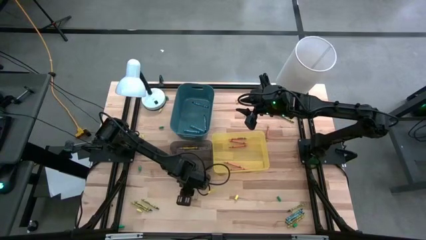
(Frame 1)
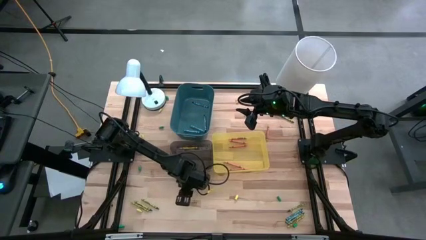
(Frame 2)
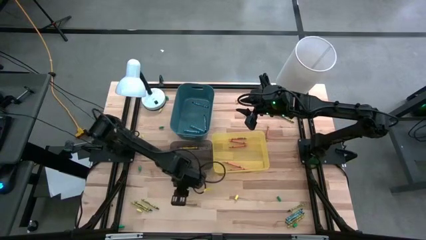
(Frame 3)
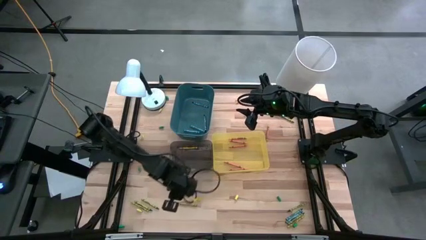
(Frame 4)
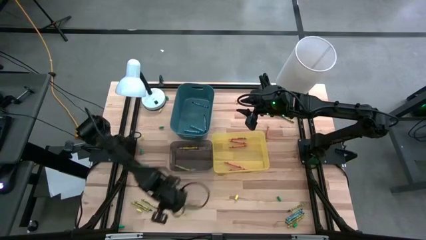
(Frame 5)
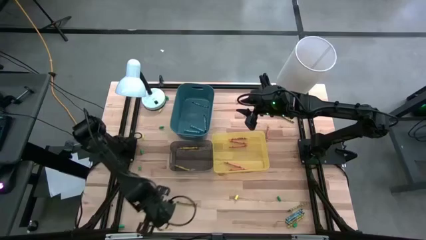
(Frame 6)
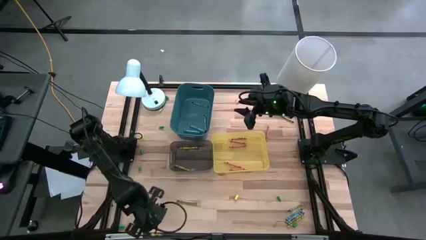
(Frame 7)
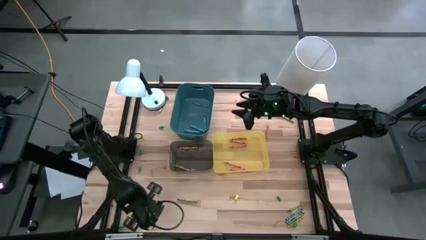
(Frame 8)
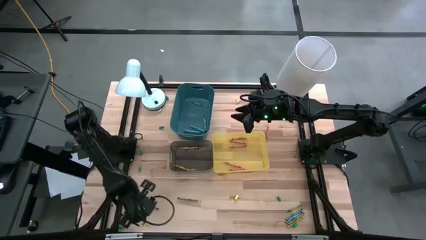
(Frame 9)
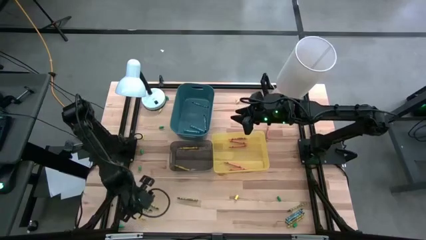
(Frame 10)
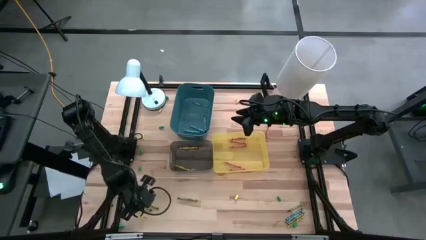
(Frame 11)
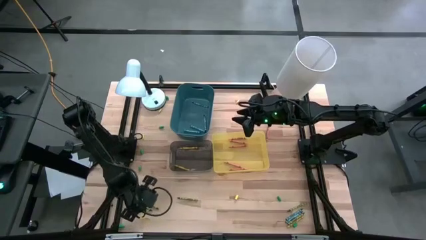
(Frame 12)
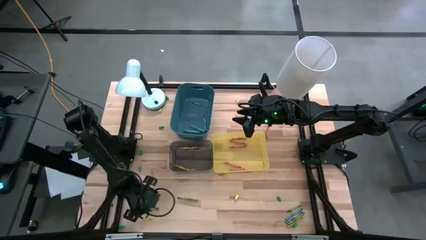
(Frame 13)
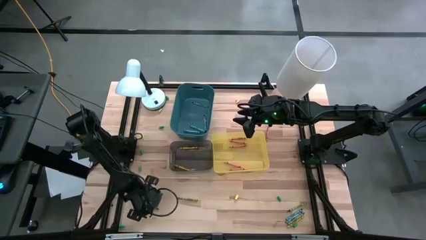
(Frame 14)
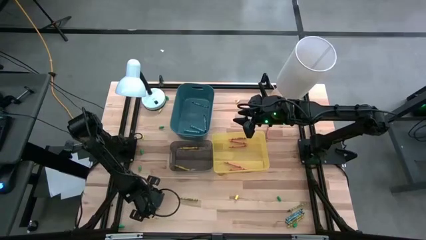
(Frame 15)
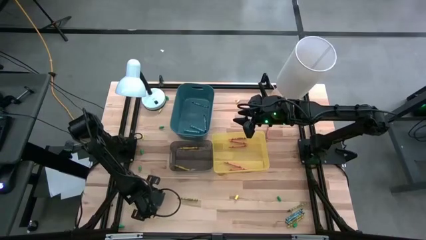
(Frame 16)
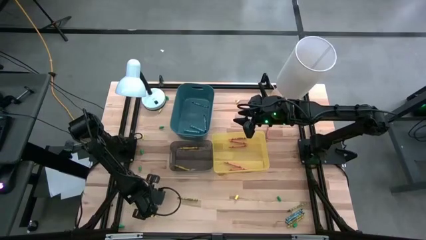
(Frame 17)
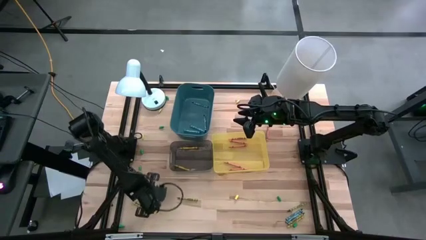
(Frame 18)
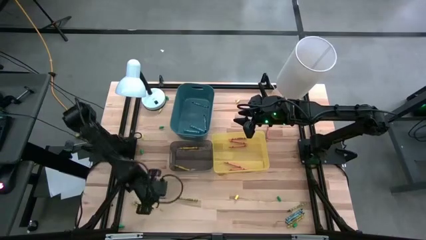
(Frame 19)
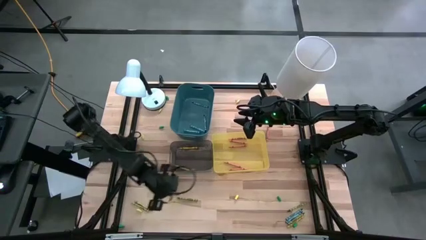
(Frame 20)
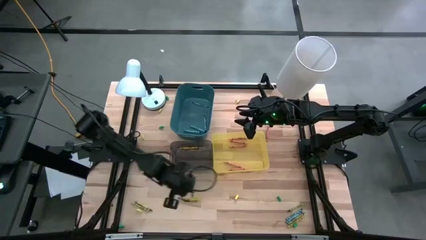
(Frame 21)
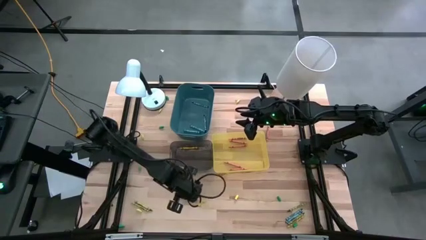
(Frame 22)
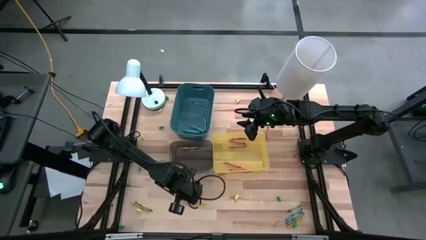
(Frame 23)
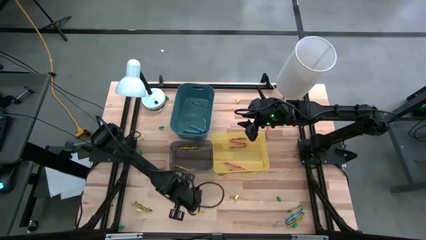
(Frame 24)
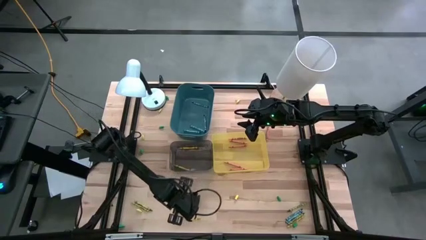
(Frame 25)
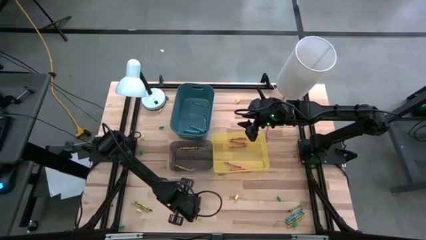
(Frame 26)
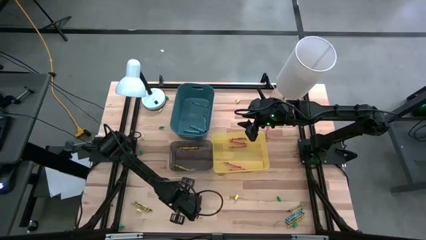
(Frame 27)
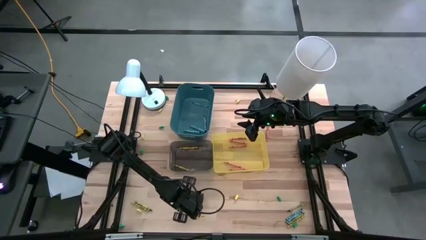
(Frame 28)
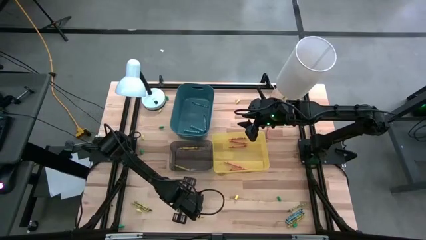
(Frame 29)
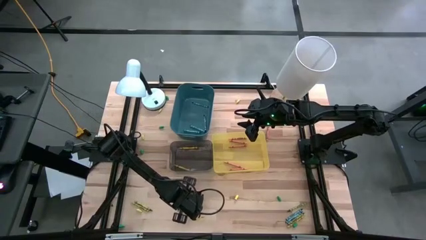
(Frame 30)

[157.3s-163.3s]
Task: Sort crayons
Move the green crayon to the bottom left of the table

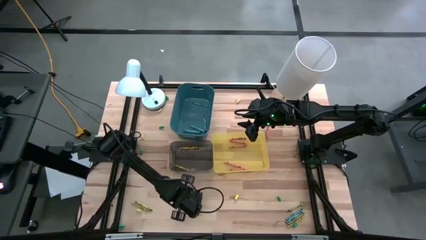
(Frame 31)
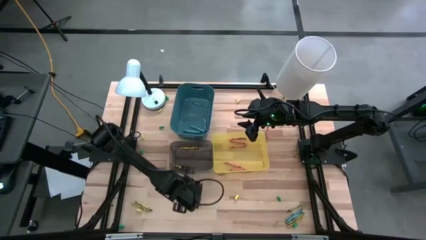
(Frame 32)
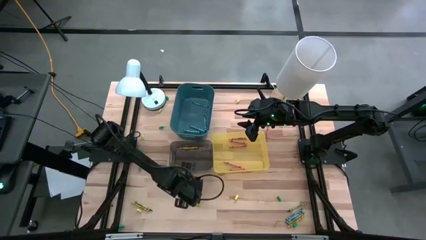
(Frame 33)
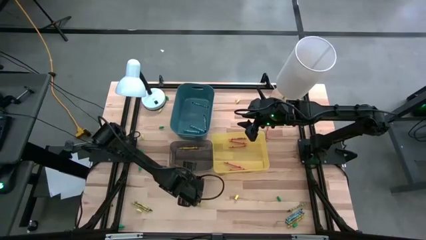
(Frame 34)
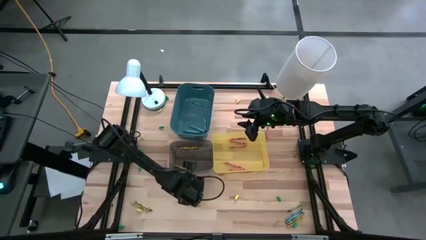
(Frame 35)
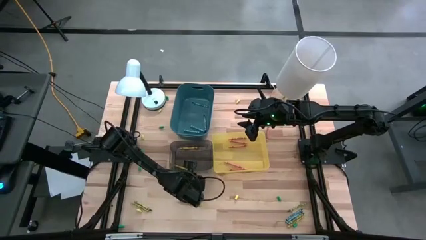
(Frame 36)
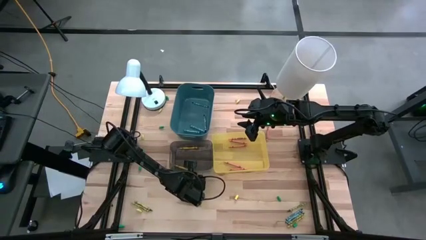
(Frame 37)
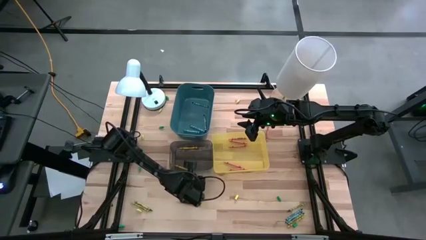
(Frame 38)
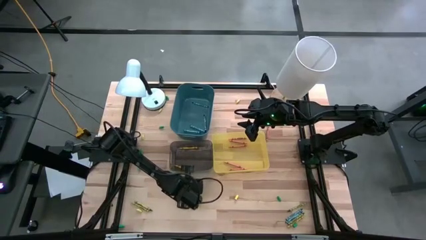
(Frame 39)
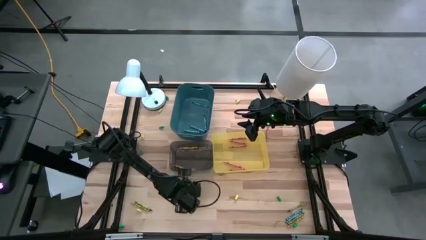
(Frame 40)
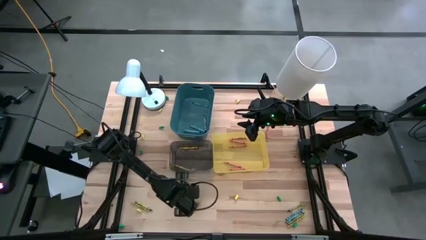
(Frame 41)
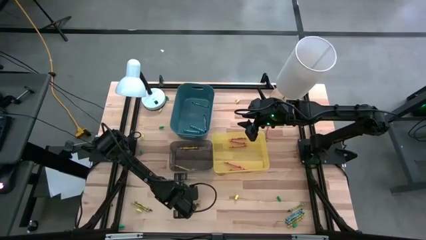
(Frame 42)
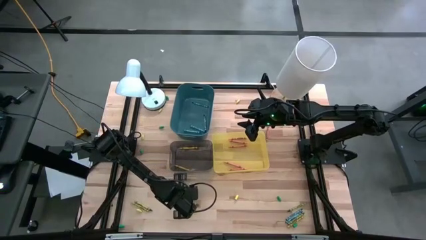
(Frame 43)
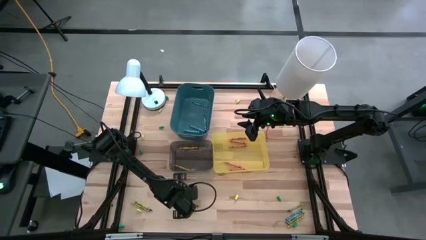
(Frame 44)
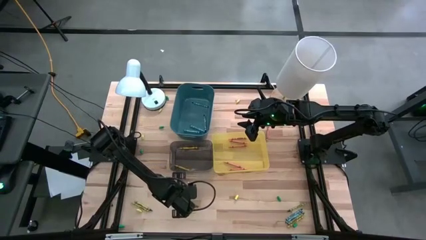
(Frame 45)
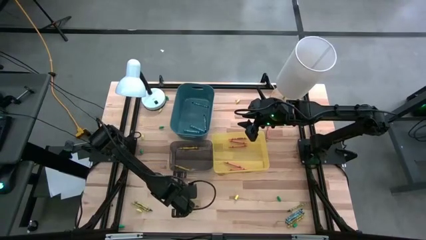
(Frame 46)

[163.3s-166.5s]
Adjust the green crayon

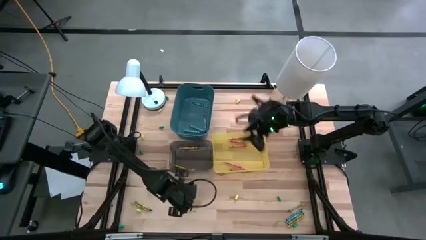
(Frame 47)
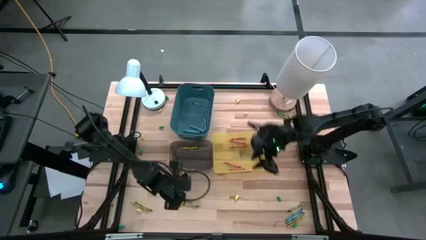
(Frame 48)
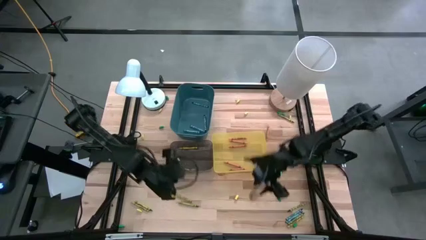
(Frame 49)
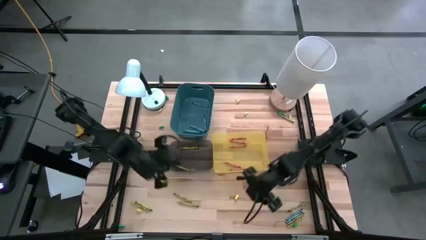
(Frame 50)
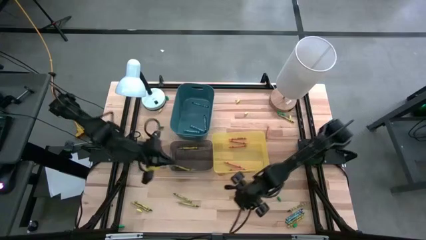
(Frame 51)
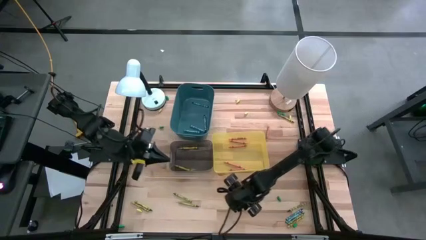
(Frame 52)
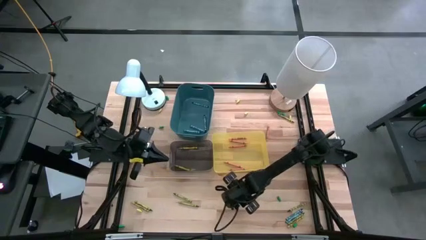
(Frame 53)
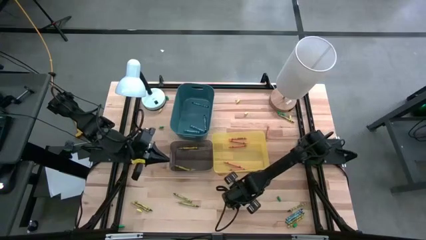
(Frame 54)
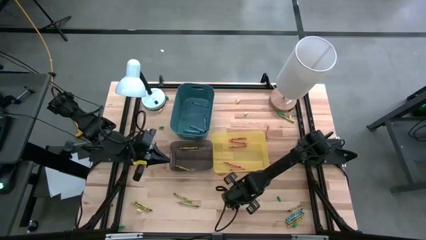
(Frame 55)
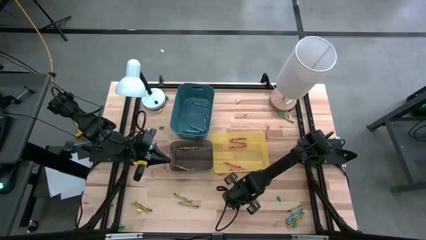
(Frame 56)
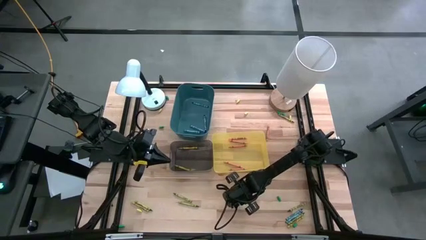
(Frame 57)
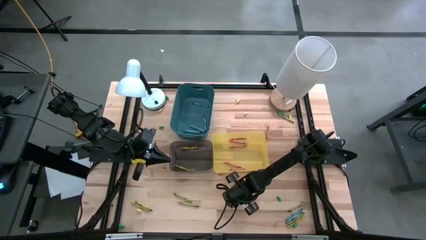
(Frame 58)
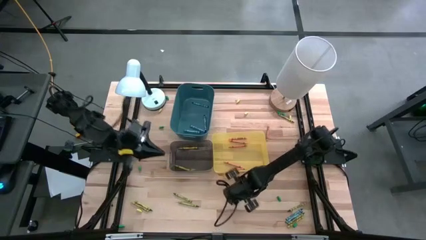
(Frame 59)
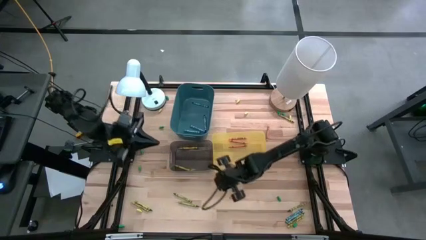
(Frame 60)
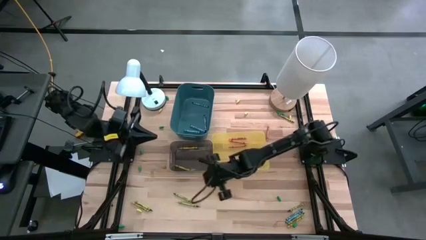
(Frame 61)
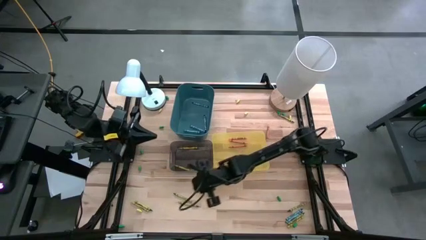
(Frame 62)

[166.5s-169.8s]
Move the yellow crayon cup to the bottom left of the table

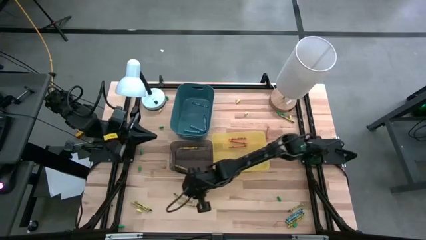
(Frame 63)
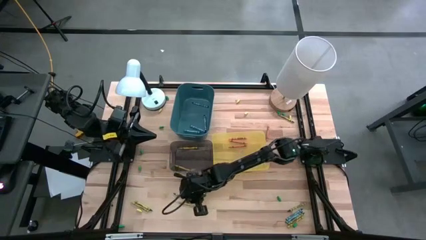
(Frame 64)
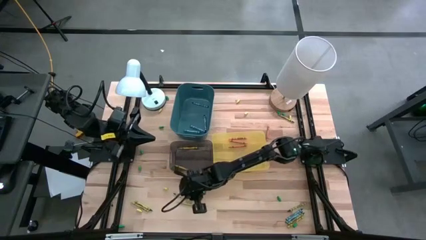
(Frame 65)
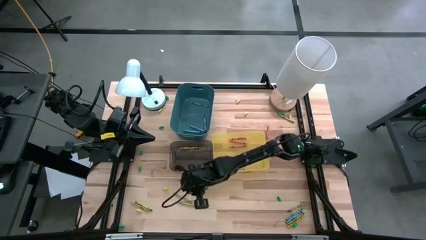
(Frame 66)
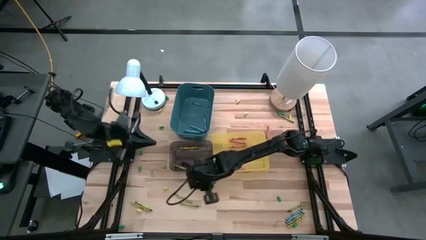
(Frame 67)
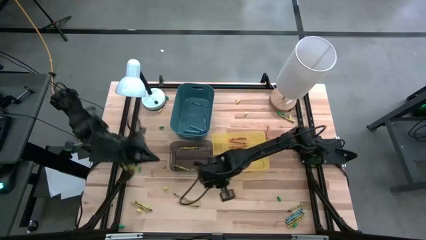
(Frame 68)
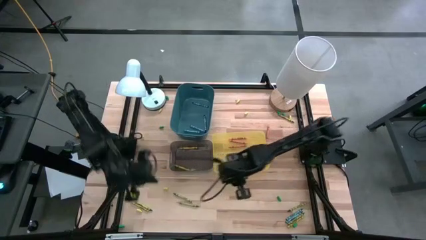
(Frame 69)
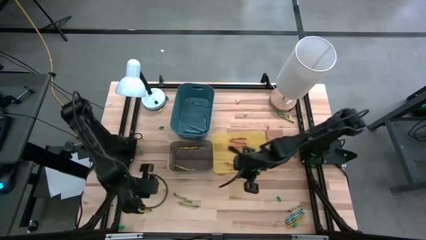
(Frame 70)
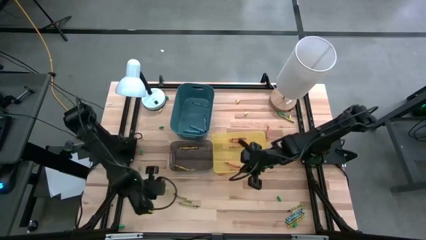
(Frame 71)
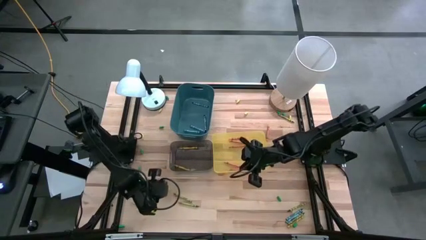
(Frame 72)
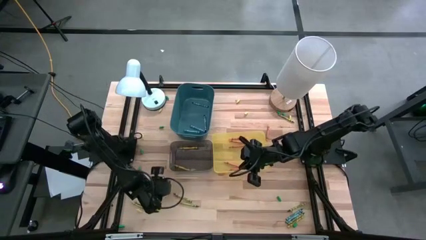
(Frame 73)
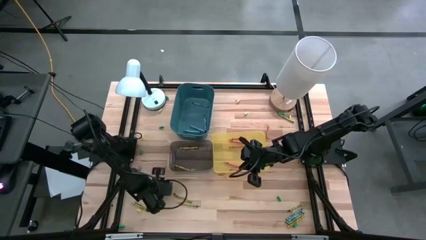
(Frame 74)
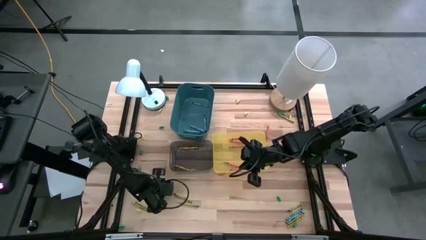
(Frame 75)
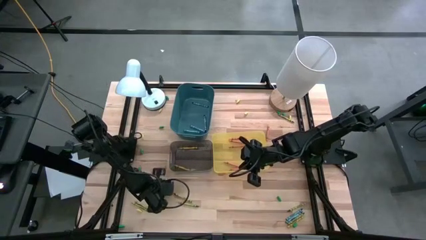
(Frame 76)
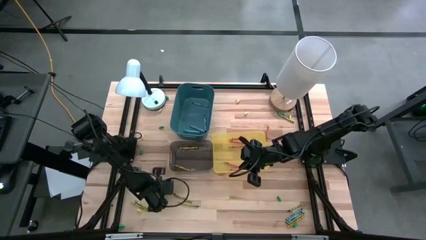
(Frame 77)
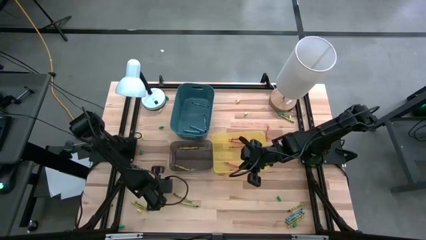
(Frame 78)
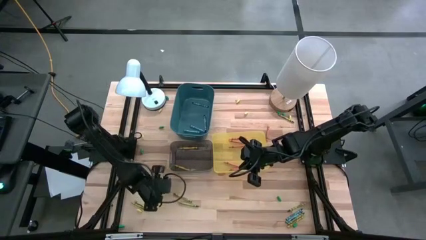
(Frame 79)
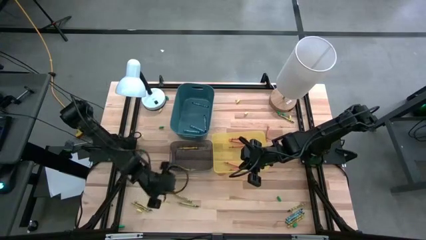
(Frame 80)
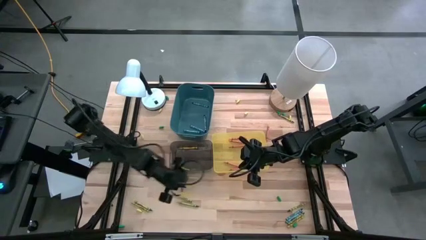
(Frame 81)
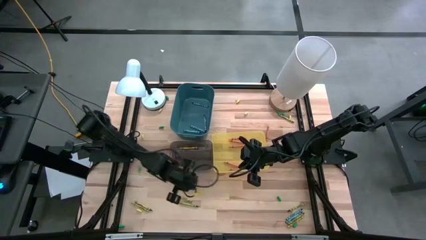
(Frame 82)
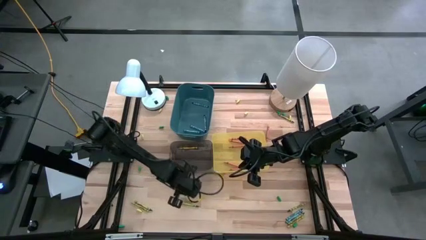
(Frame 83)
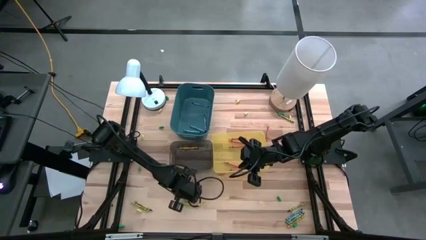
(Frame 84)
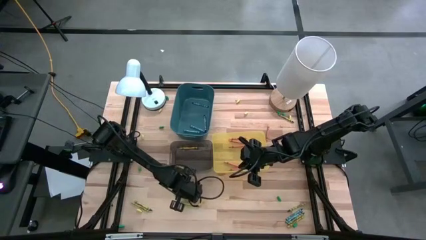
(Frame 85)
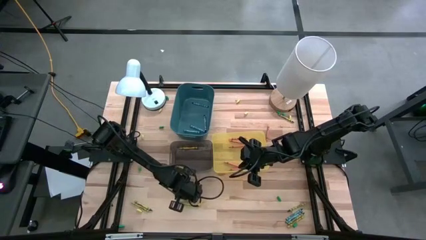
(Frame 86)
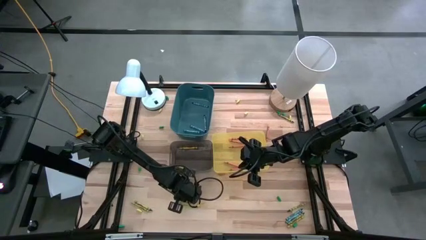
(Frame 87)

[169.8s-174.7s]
Move the yellow crayon to the bottom left of the table
